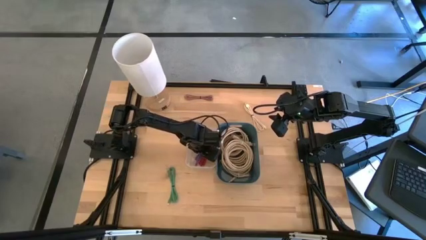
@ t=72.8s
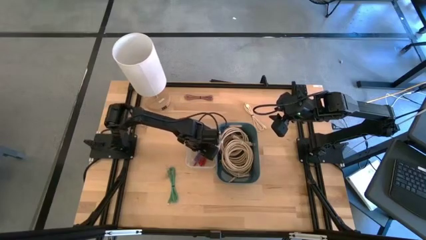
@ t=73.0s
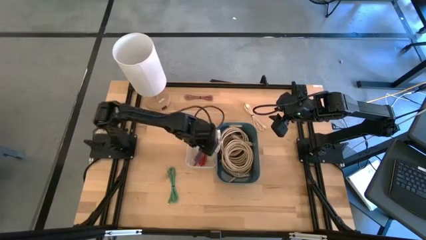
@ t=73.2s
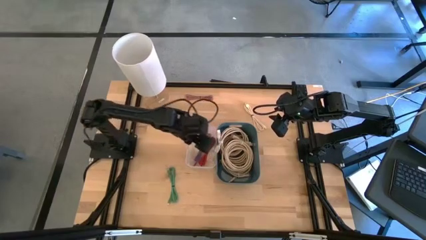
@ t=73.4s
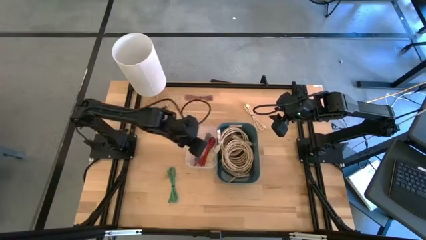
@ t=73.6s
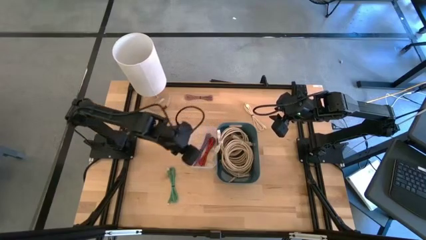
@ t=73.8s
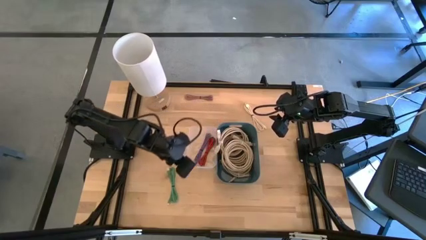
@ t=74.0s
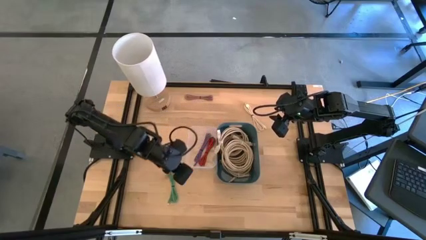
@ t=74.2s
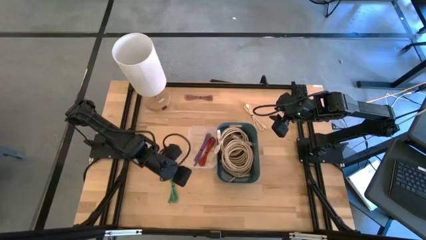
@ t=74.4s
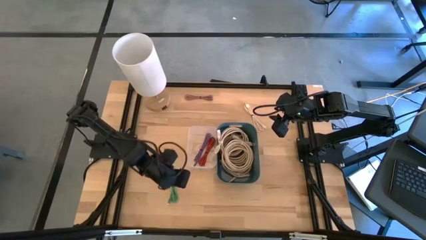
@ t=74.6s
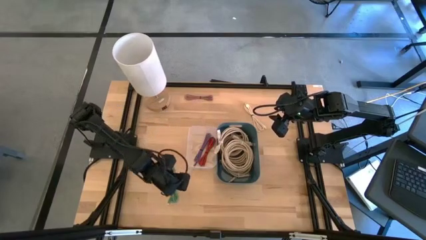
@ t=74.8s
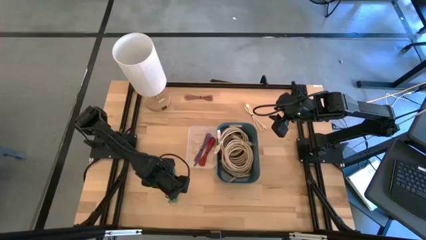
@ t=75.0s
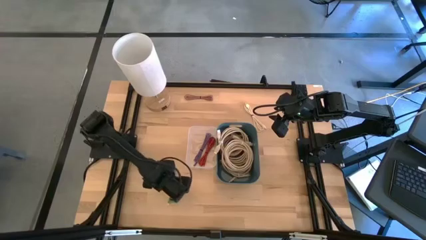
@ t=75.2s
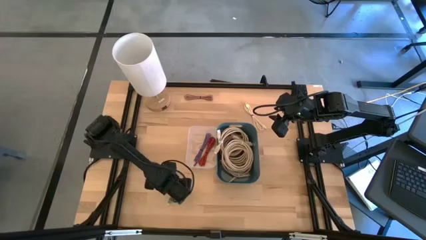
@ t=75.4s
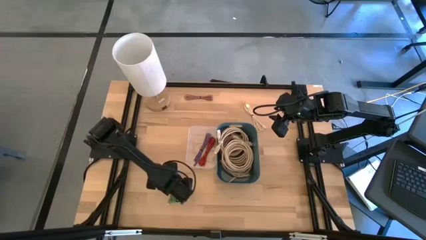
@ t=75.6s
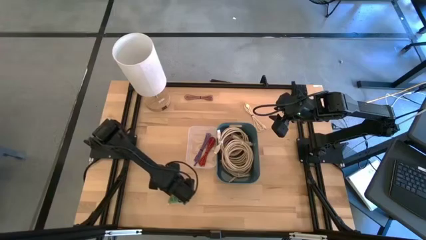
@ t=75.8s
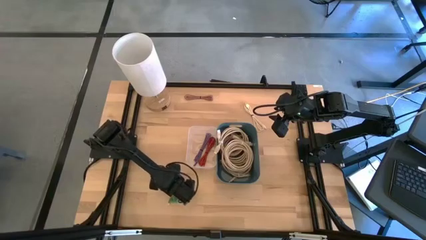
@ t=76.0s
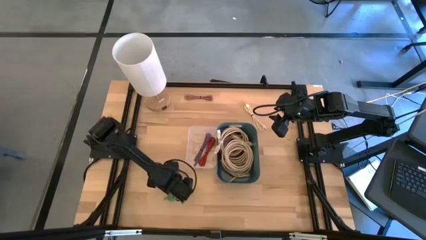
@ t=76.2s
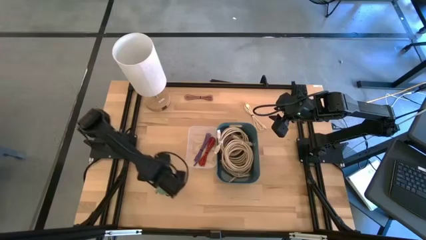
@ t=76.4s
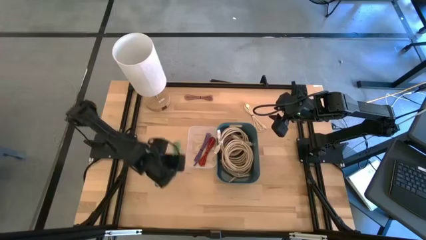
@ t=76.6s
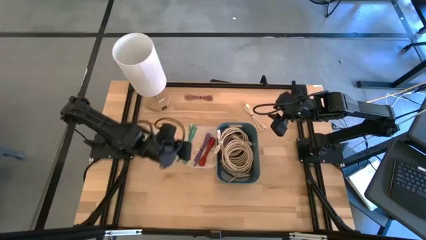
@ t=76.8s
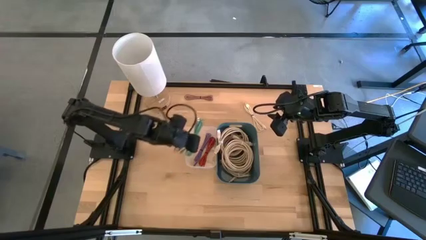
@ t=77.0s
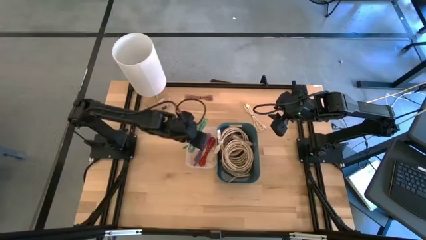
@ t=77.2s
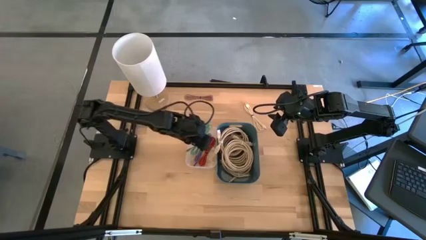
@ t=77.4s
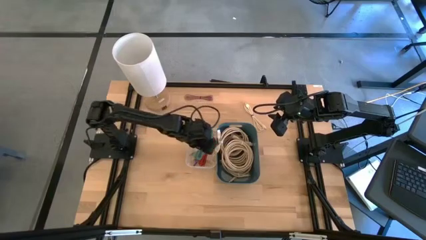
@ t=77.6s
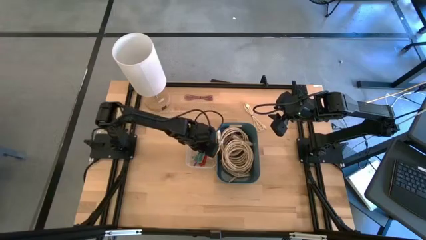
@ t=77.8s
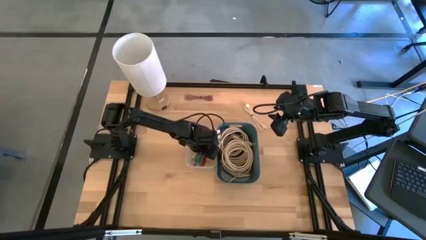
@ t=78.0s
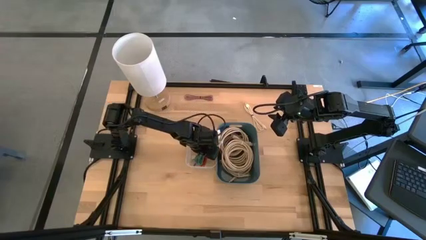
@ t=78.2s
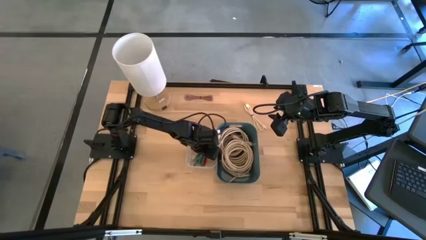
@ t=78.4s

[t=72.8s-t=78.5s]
Put the green charger cable into the white transparent bin

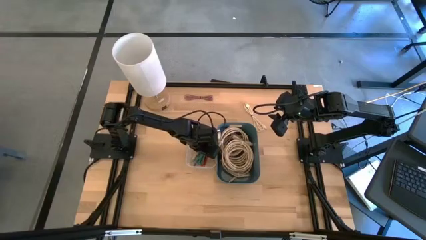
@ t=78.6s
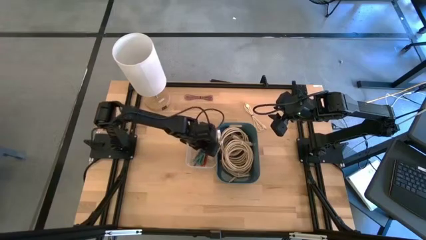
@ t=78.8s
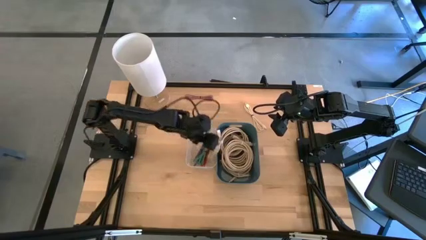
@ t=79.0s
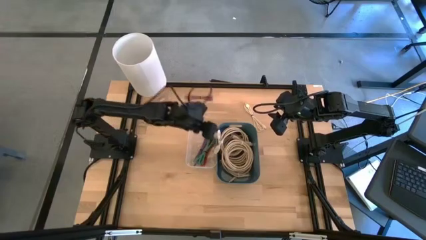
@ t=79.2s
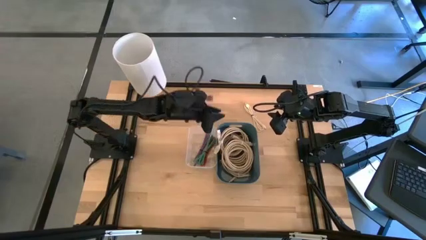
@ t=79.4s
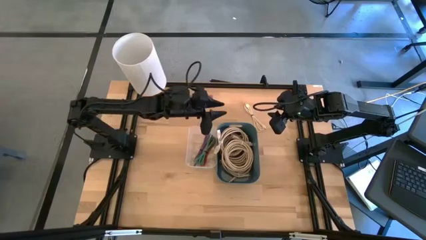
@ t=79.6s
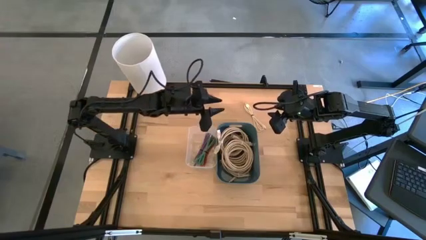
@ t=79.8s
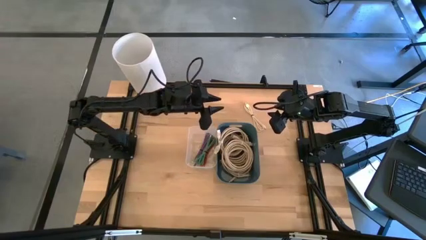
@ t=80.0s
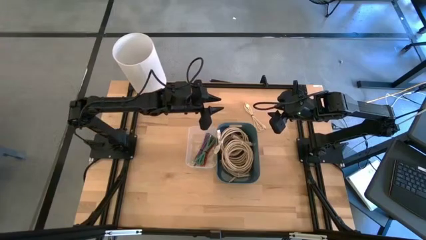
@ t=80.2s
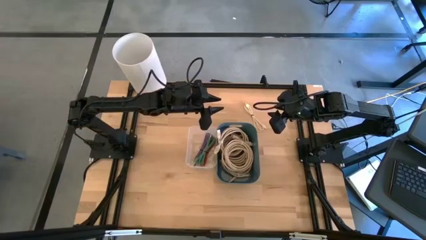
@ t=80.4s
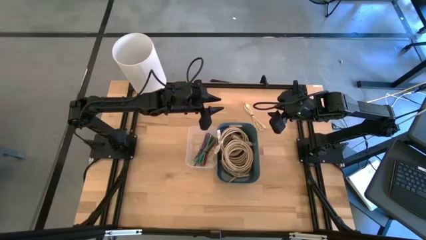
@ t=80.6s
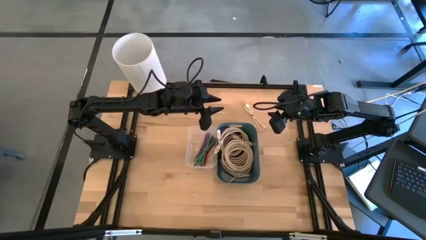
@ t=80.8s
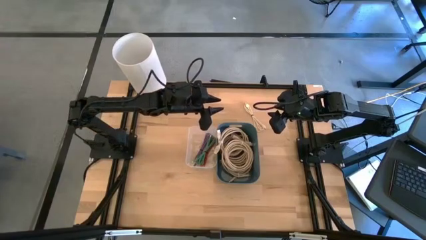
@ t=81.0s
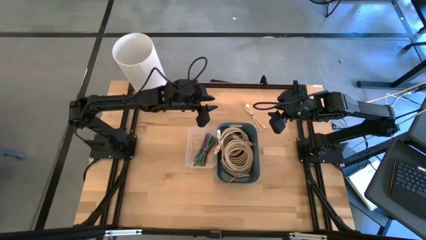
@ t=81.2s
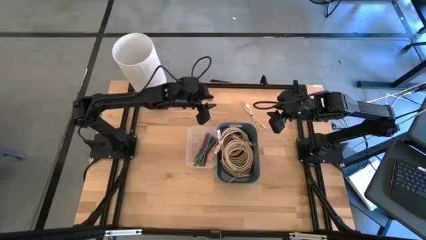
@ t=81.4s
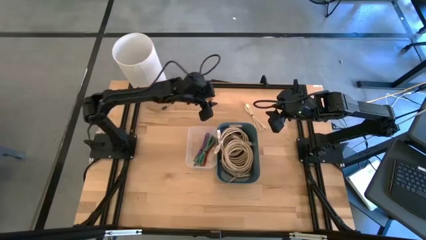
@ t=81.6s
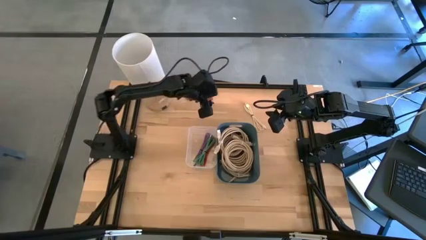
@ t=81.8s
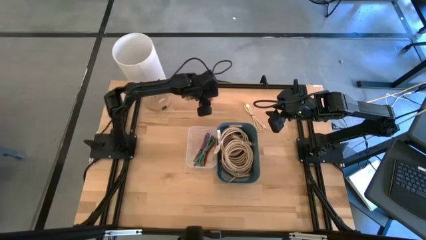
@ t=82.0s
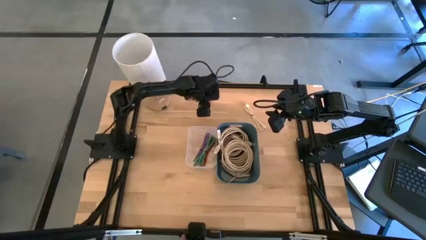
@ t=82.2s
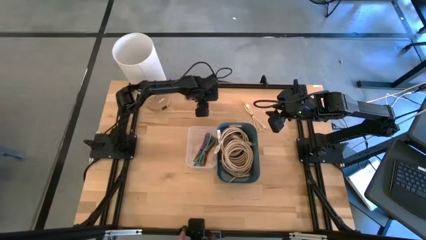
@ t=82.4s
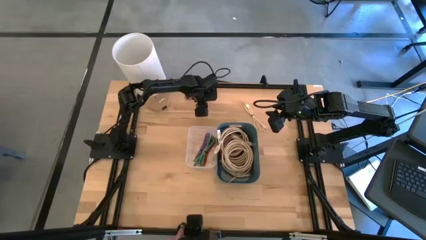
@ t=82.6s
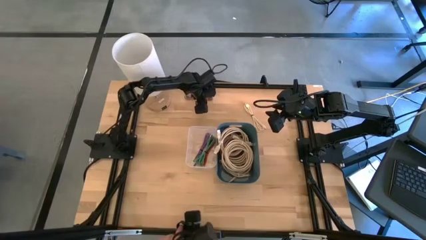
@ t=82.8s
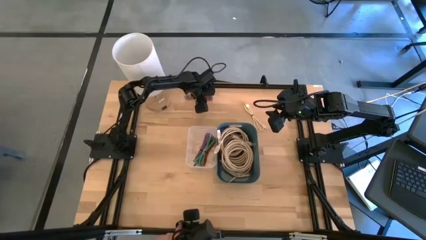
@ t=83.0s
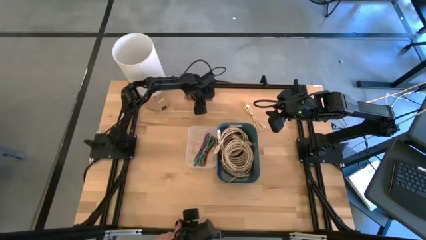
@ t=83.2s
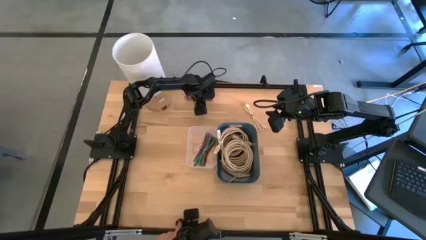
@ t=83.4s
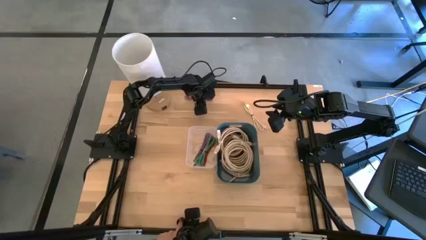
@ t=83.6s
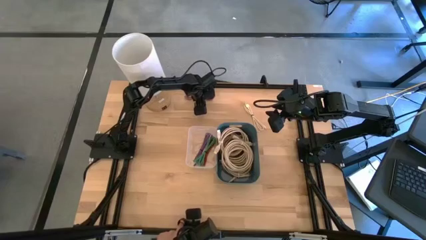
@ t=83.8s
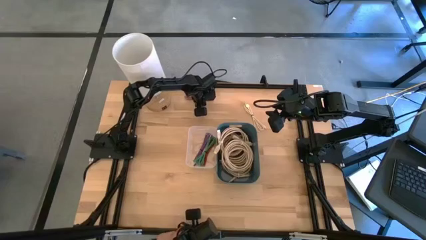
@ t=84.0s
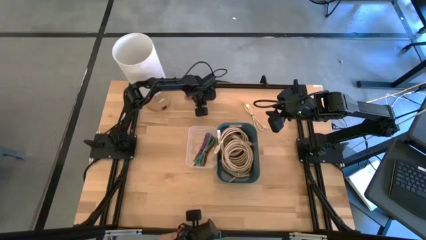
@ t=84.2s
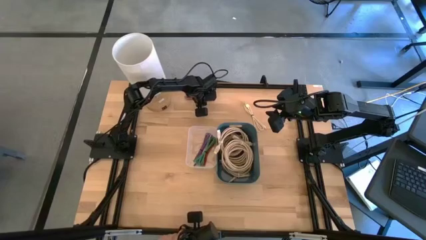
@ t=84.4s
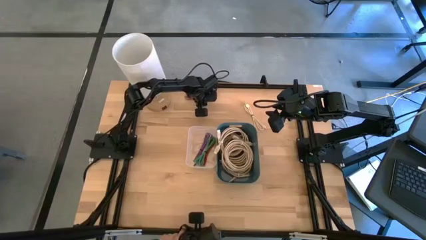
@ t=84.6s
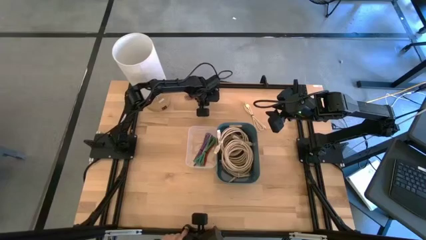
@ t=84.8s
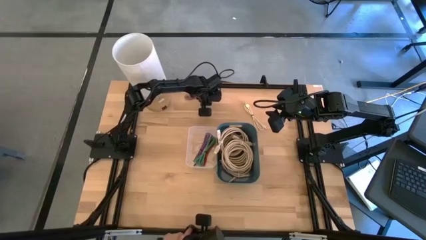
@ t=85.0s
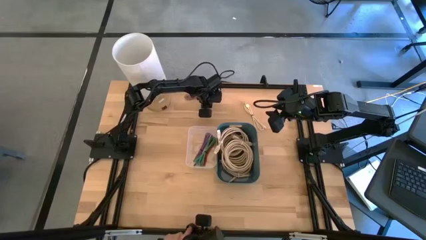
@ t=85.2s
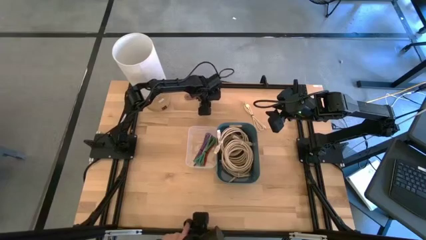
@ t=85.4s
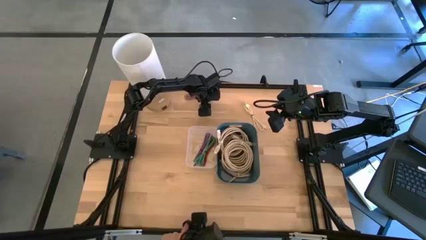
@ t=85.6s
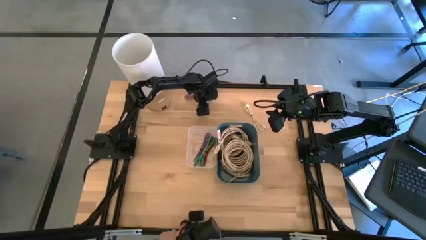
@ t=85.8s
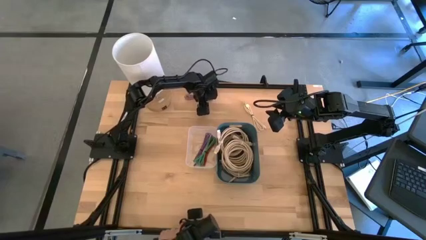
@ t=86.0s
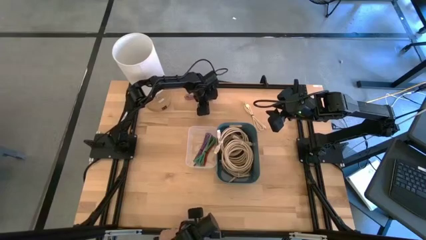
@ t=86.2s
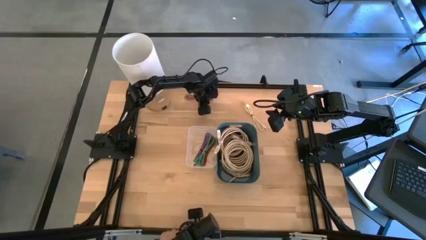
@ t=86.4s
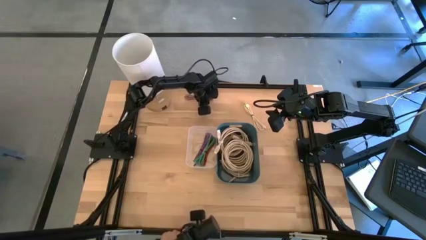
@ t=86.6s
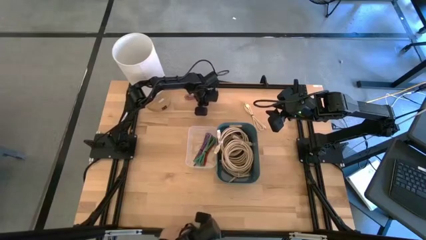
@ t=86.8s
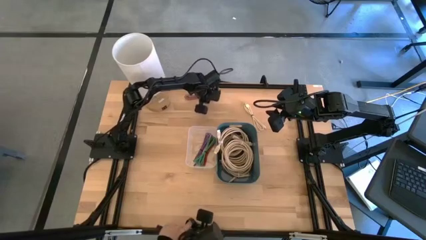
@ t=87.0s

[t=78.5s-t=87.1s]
Put the pink charger cable into the white transparent bin

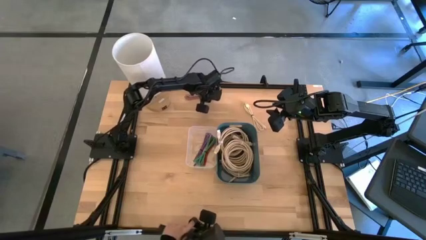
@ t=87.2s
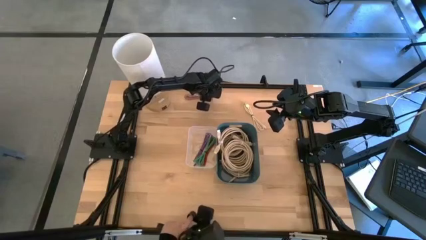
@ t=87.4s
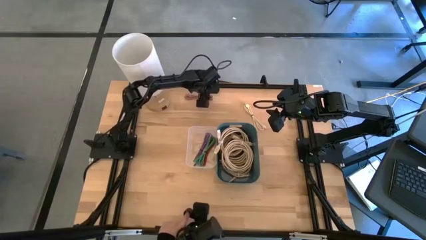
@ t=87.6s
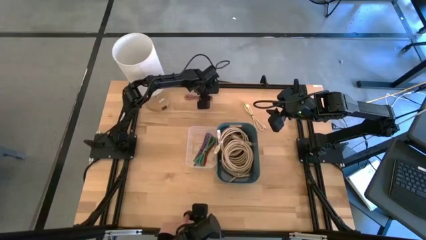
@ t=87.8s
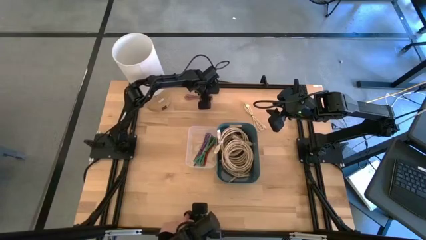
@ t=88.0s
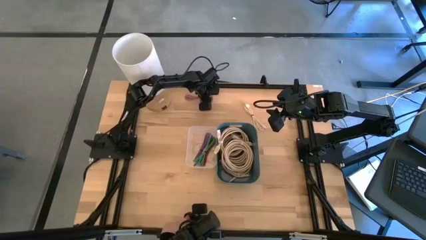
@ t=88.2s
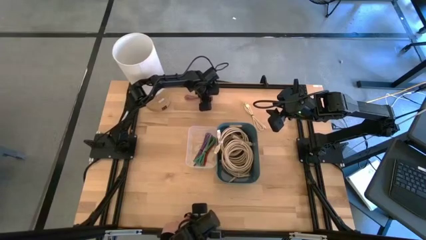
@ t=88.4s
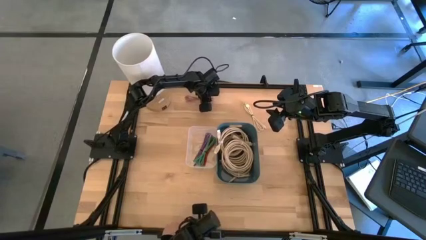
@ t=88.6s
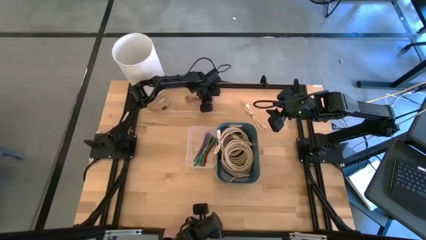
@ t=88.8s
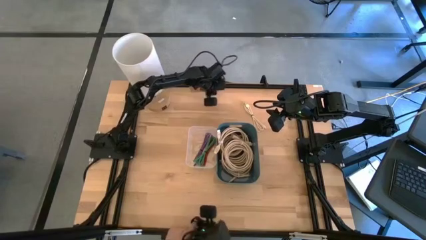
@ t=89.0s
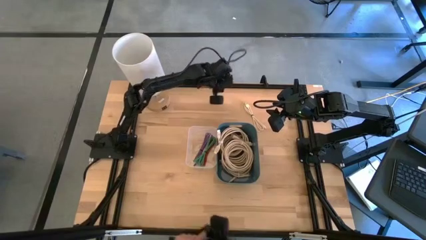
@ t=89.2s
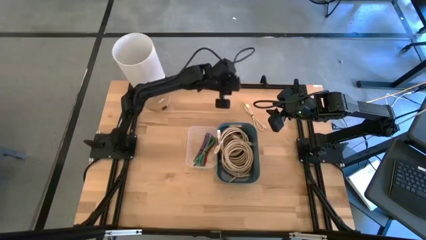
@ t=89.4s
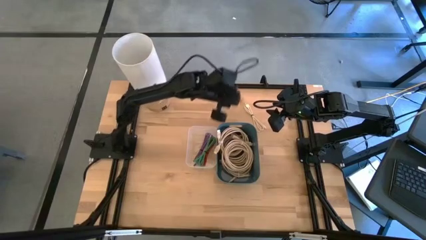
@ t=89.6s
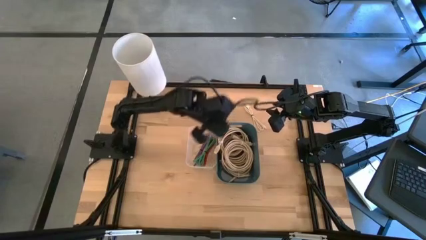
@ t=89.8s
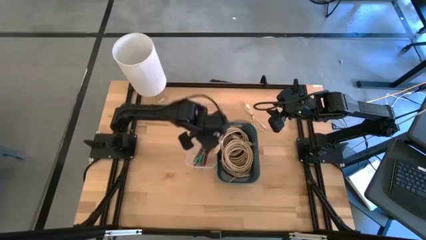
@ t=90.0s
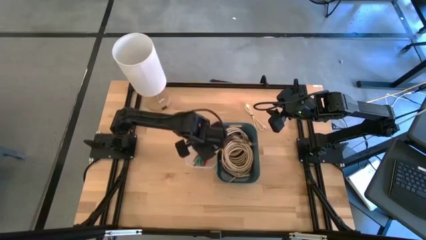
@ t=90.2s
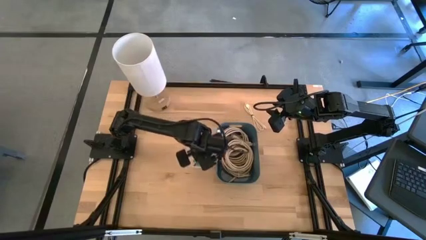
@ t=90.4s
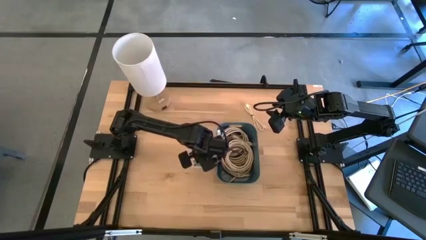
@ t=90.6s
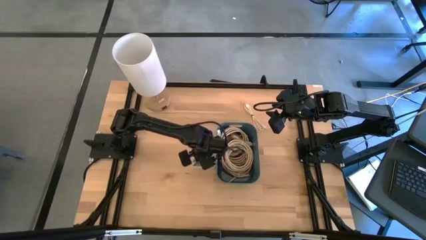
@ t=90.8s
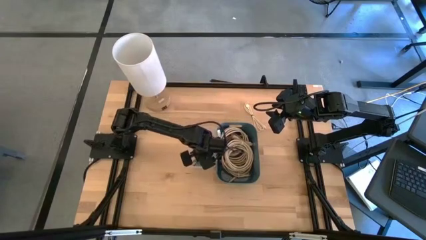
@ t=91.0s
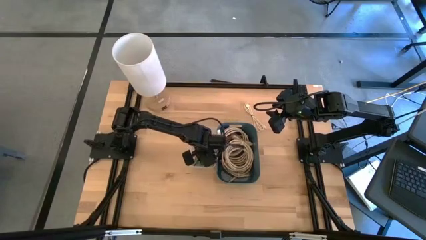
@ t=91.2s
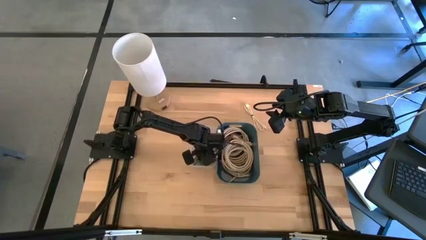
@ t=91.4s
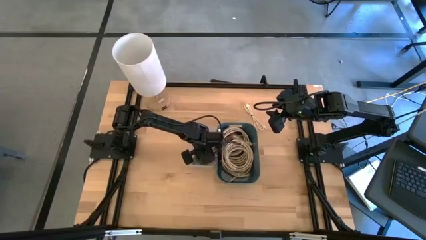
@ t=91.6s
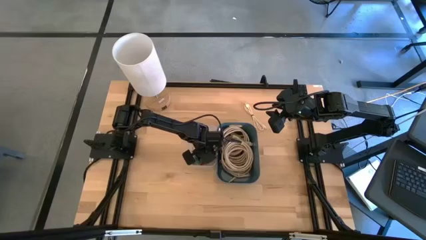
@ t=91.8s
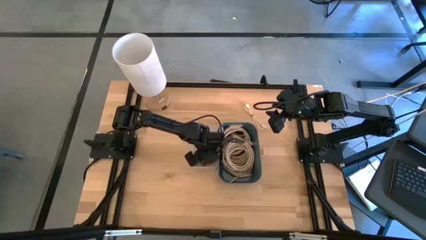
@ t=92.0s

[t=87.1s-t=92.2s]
Put the pink charger cable into the white transparent bin
